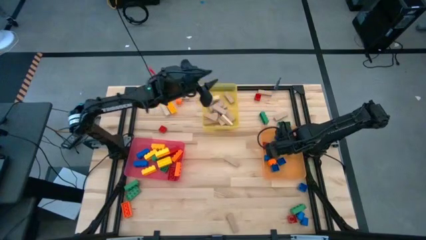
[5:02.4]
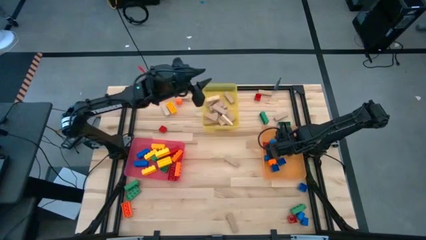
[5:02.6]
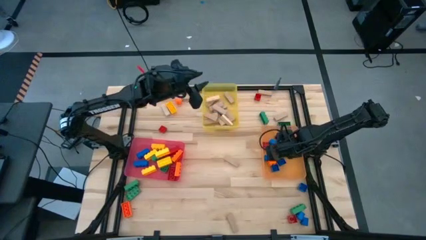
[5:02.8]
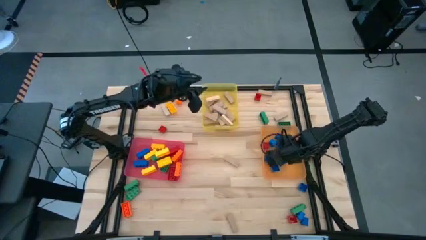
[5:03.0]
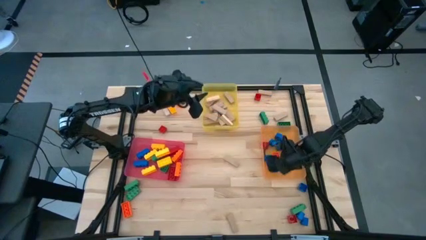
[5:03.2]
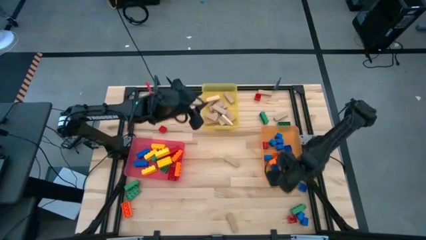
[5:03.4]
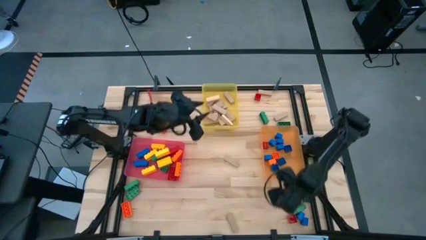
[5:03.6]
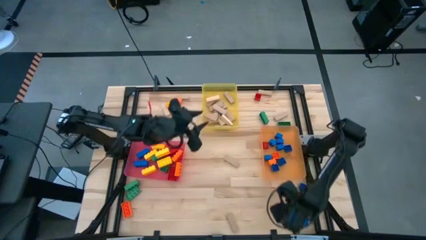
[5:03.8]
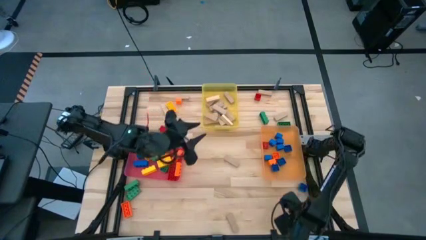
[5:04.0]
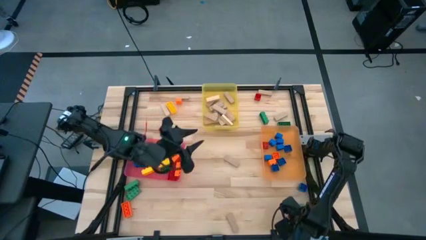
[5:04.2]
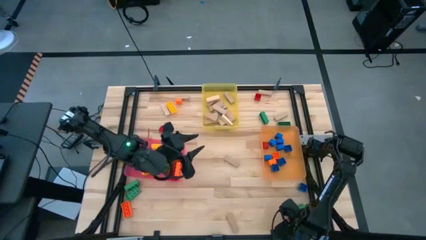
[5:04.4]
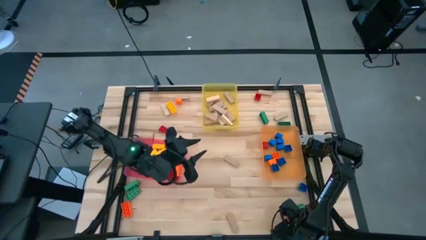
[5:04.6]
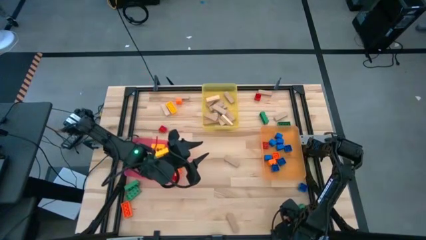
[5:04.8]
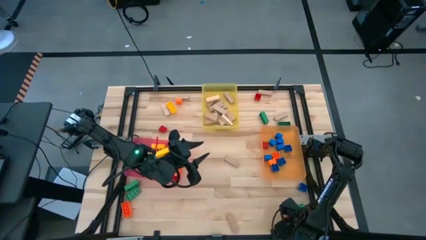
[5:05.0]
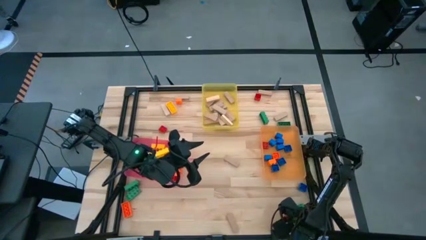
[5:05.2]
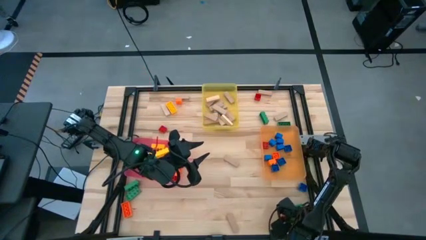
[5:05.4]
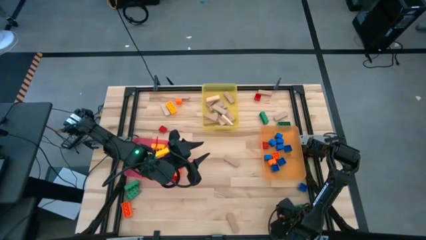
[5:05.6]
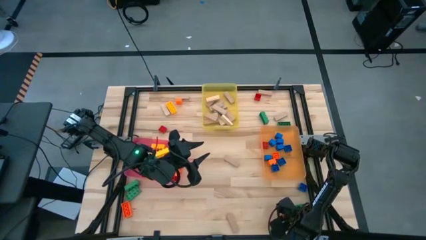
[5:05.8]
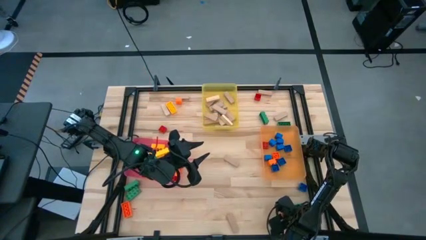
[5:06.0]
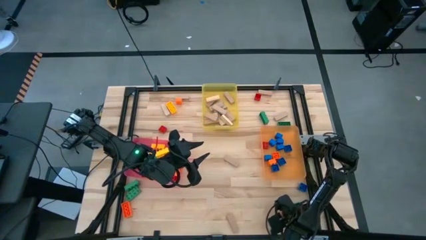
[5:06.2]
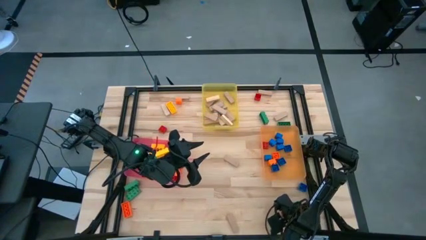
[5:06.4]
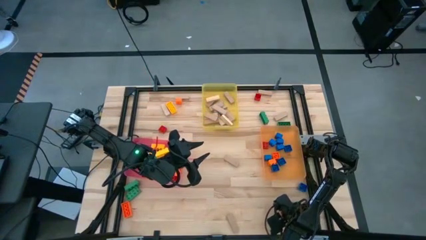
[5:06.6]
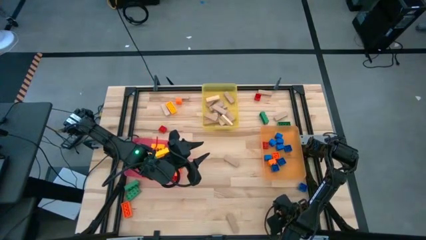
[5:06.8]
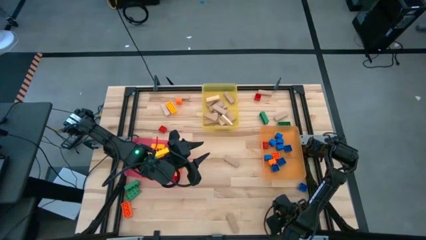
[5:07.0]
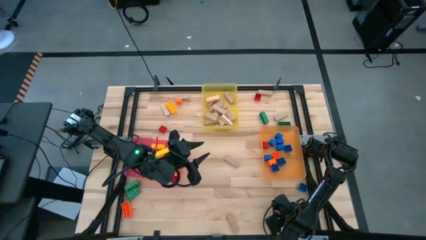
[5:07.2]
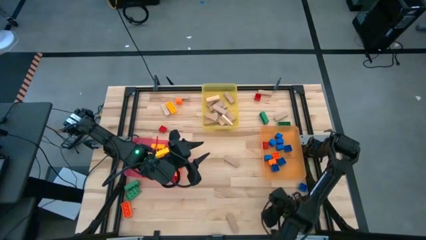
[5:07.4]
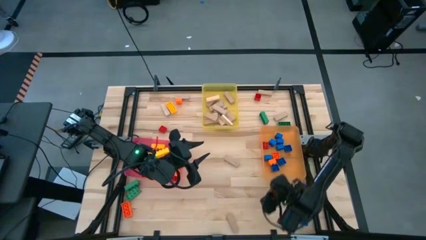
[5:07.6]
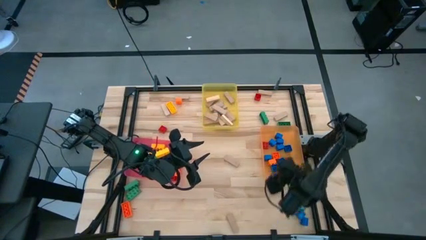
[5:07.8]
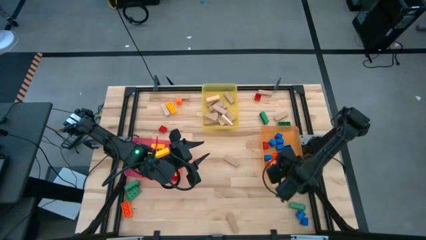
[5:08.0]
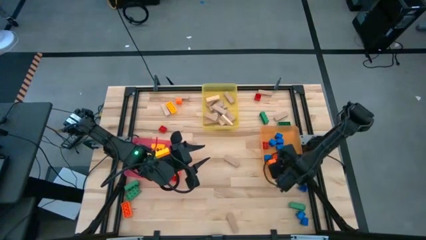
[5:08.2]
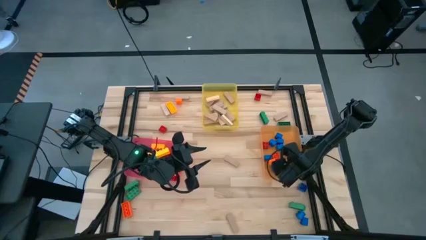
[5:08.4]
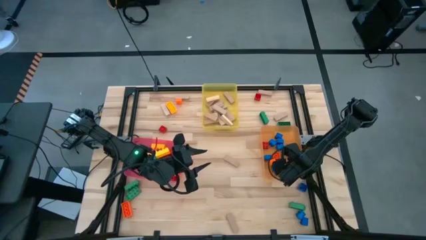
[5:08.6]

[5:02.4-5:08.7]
Task: Sort blocks by size
Put the 1 stud red game piece into the orange bin

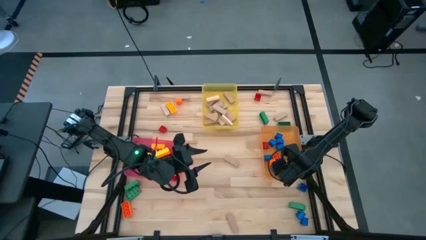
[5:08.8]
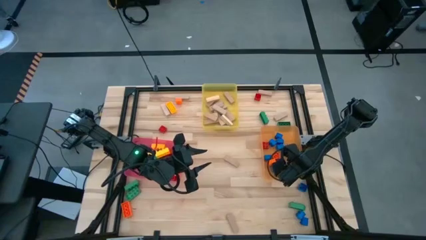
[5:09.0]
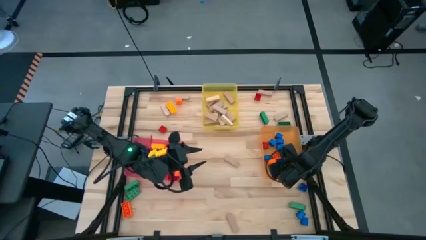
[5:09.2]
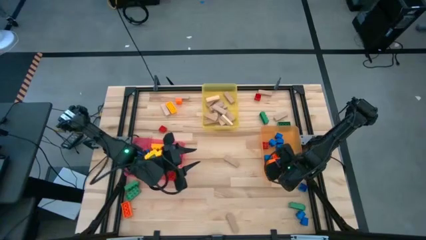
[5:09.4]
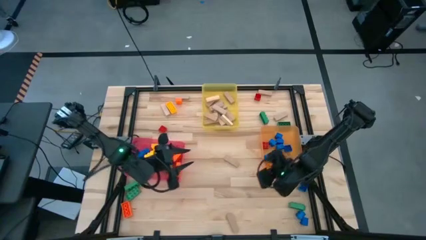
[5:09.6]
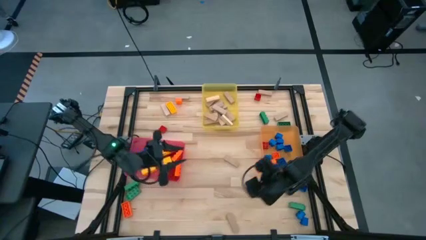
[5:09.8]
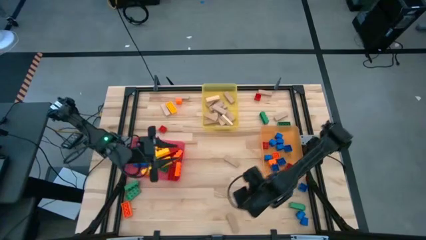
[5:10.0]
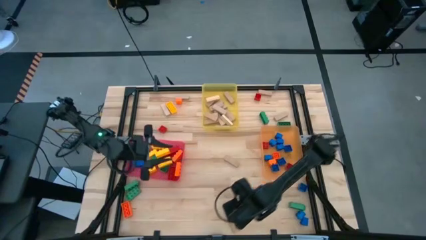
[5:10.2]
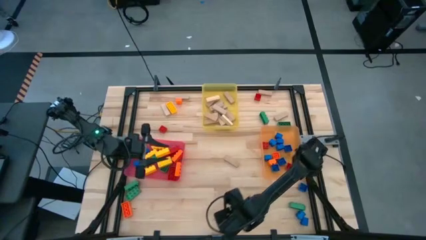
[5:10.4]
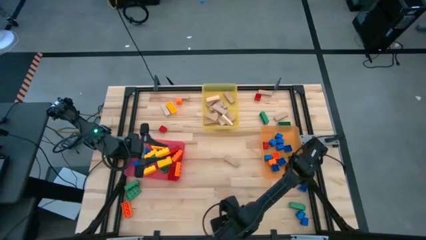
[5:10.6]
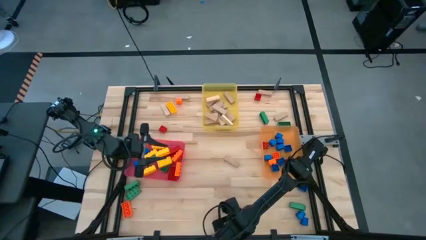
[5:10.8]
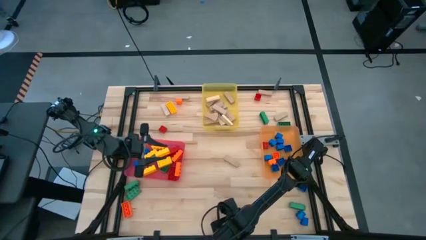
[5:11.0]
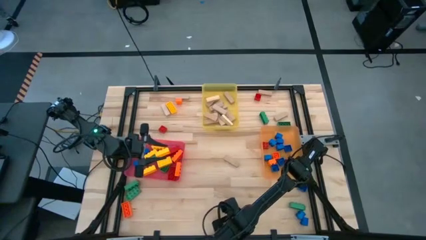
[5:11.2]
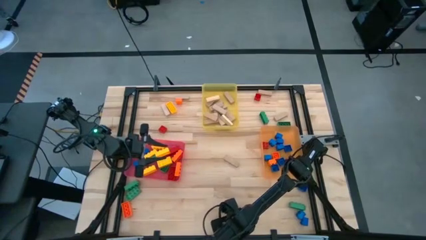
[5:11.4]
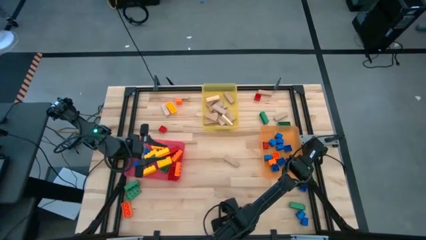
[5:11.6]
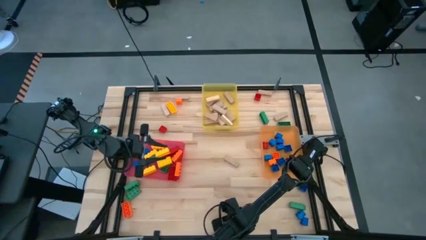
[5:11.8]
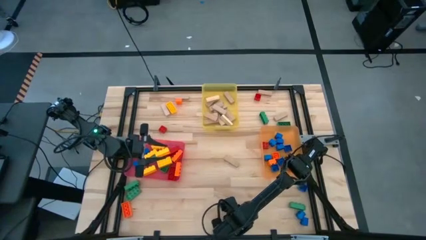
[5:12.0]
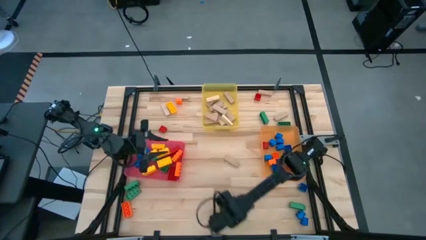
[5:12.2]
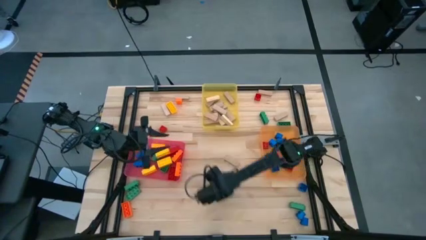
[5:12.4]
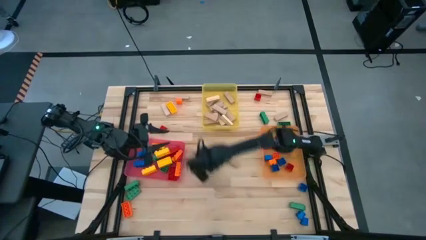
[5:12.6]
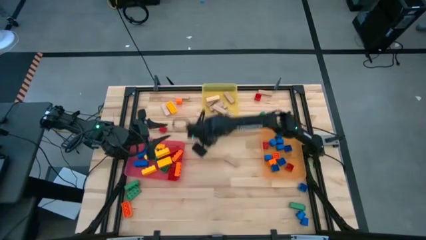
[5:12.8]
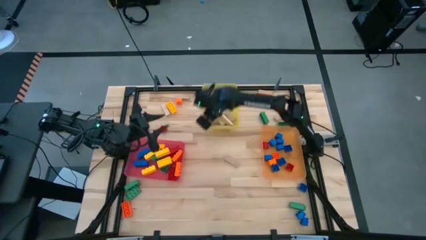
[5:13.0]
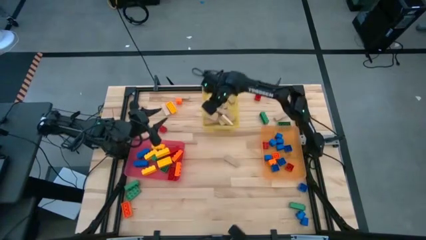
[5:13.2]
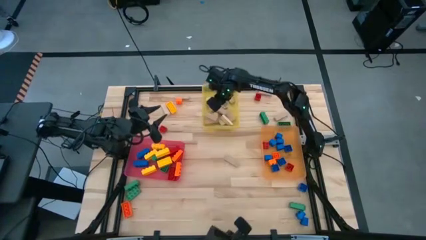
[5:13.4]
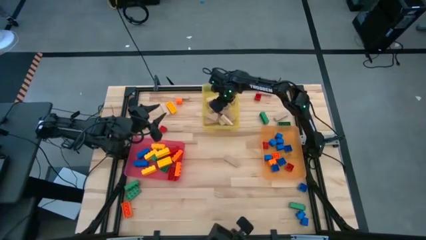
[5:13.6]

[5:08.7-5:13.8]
Put the wooden block into the yellow bin
